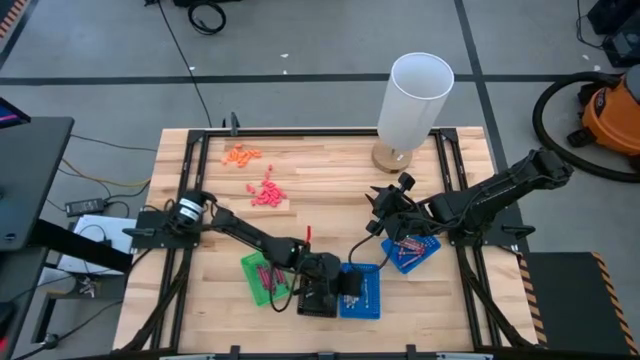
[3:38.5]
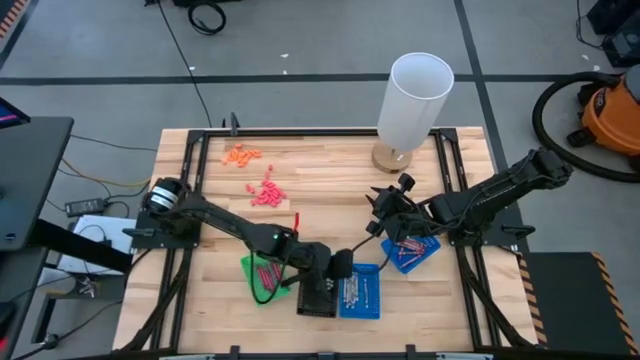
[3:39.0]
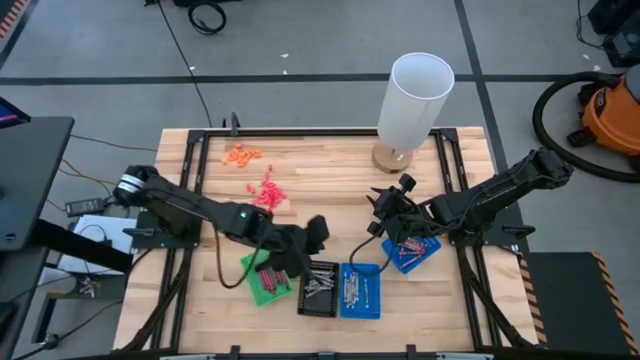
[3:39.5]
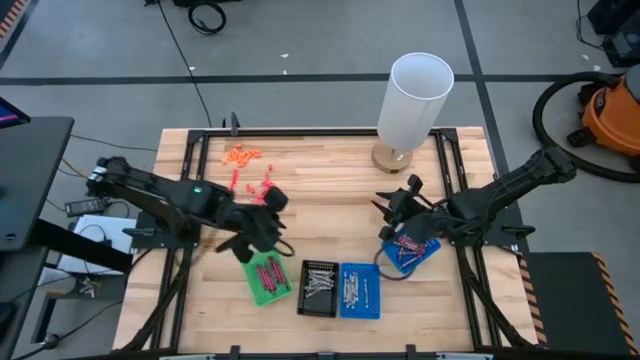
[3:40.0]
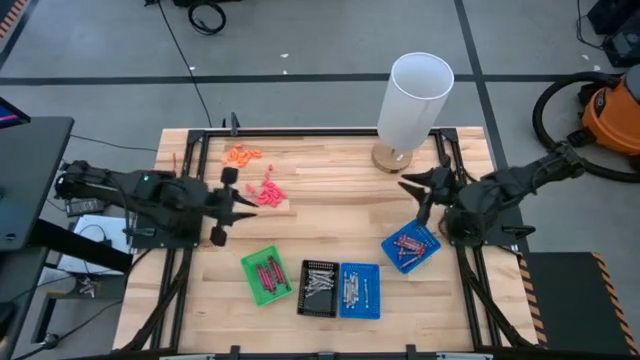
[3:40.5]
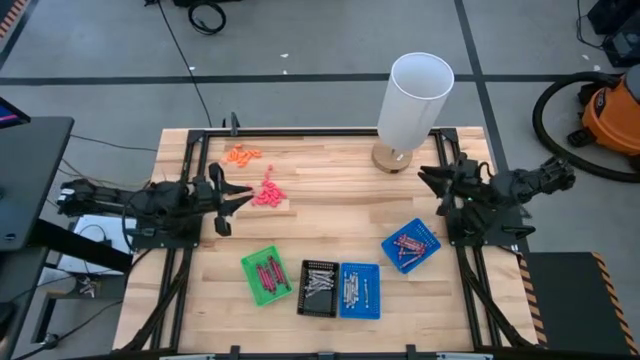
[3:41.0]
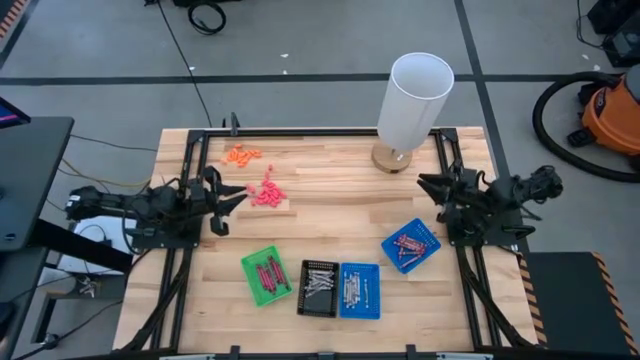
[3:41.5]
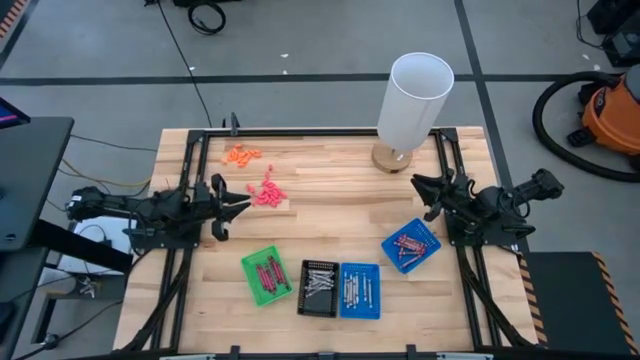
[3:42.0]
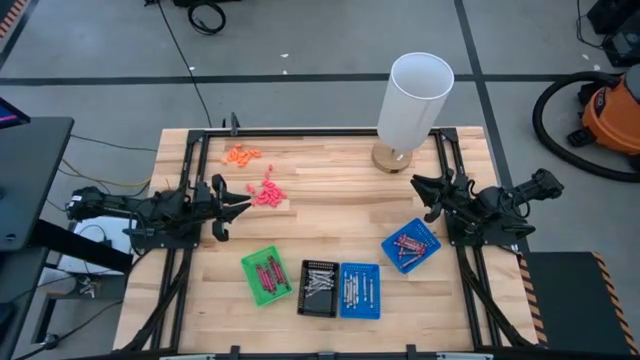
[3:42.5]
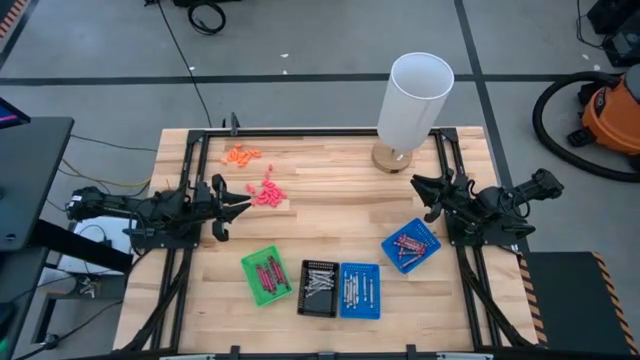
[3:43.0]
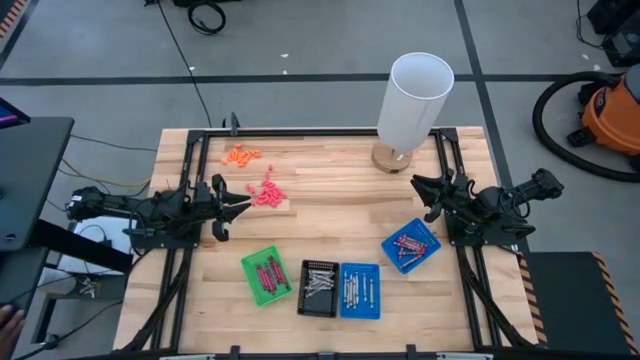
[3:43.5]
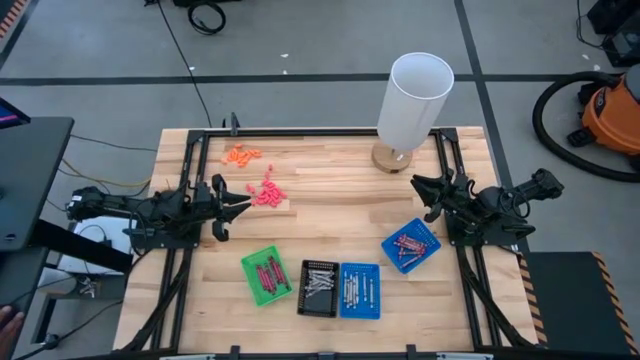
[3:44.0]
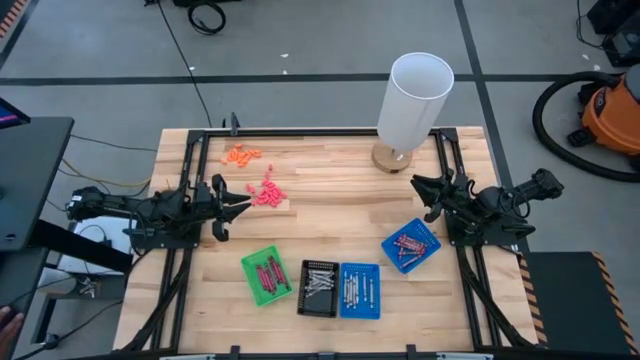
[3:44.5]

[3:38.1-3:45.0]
Task: Sort crayons
Return to Home Position

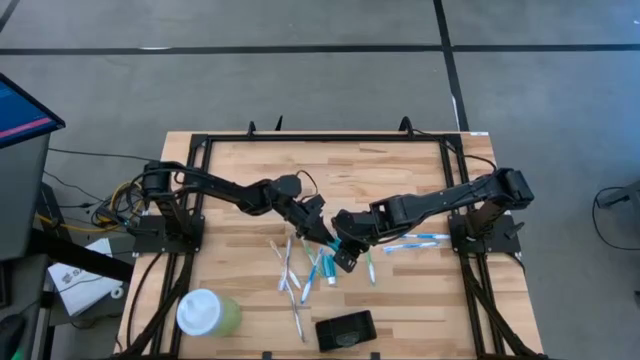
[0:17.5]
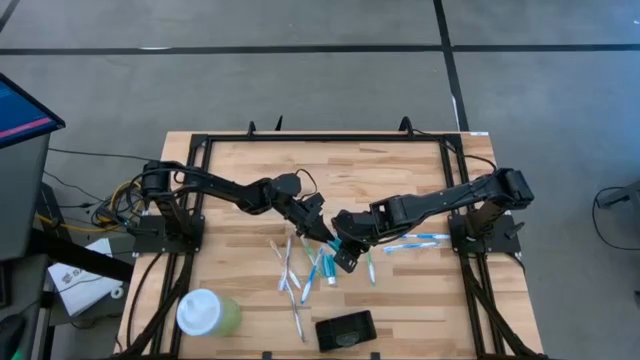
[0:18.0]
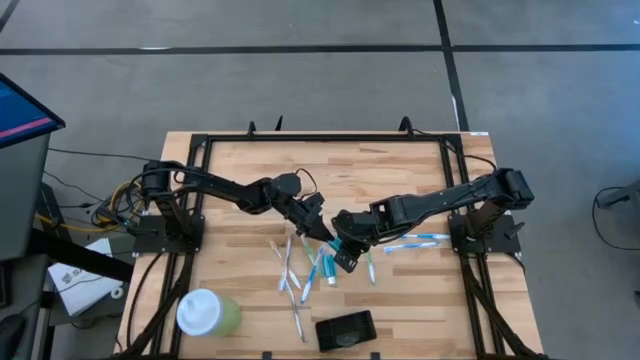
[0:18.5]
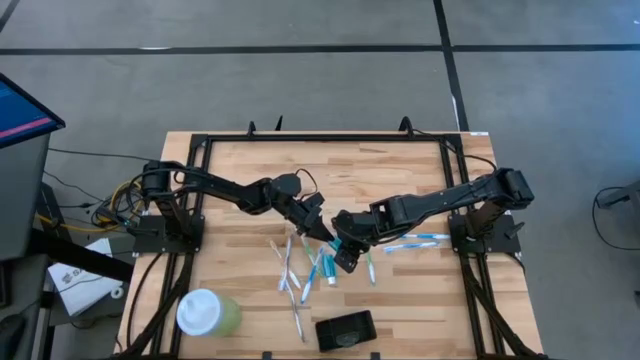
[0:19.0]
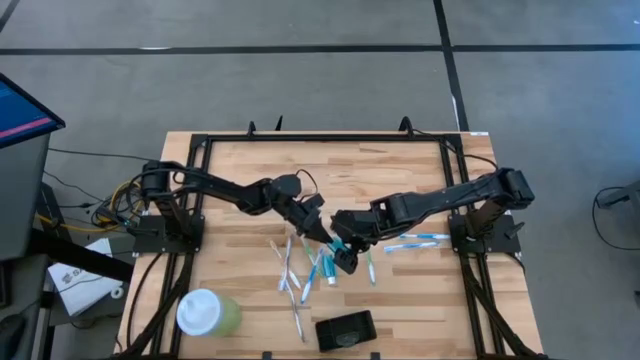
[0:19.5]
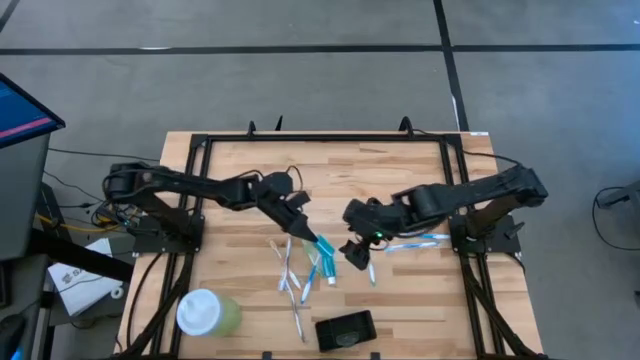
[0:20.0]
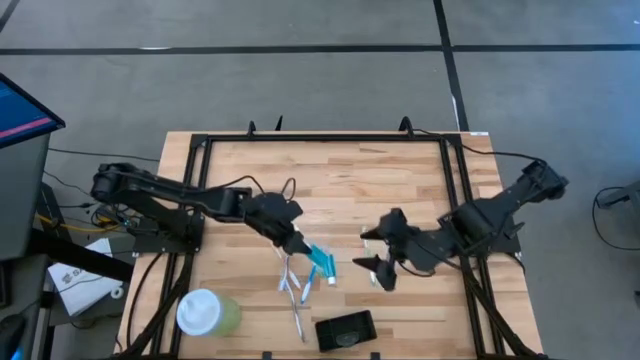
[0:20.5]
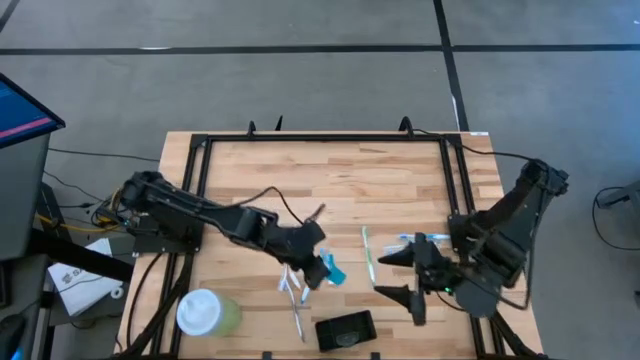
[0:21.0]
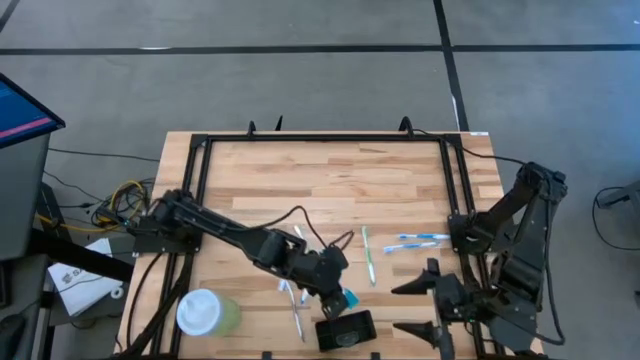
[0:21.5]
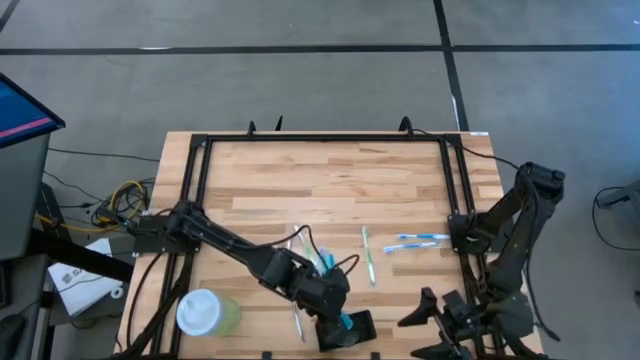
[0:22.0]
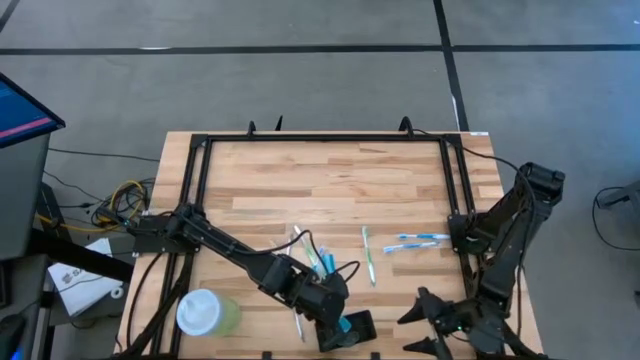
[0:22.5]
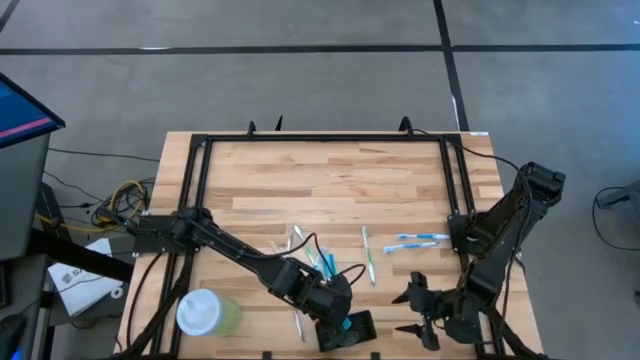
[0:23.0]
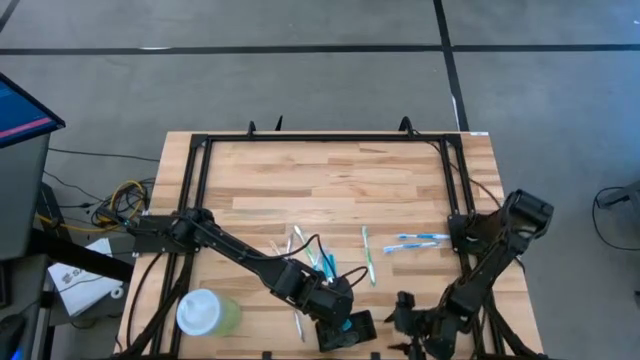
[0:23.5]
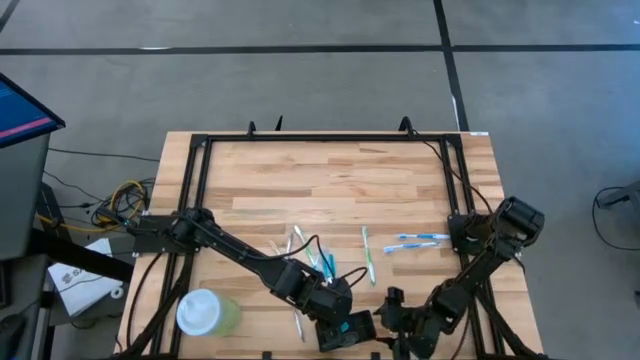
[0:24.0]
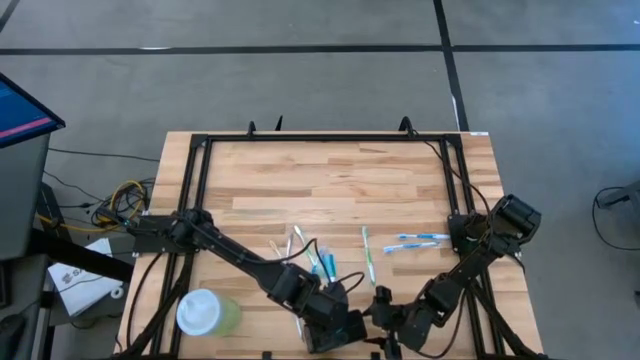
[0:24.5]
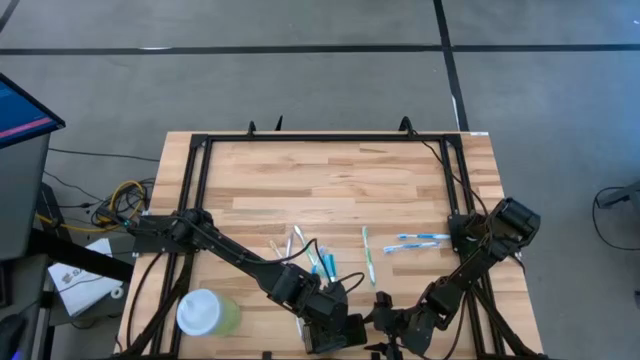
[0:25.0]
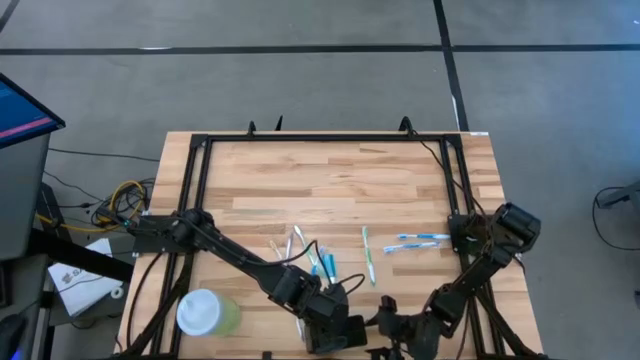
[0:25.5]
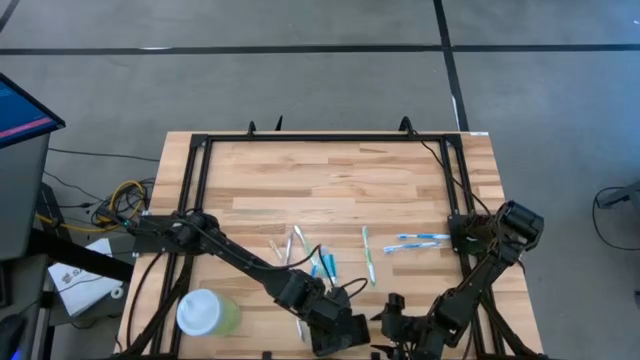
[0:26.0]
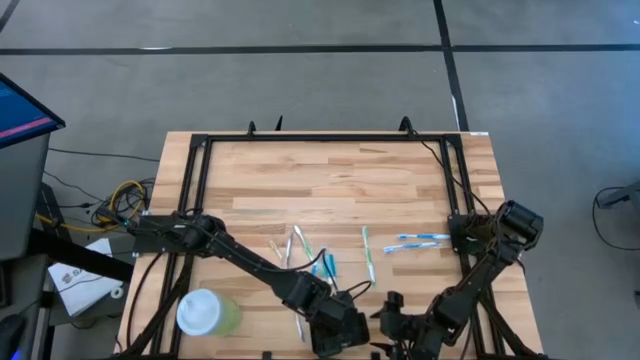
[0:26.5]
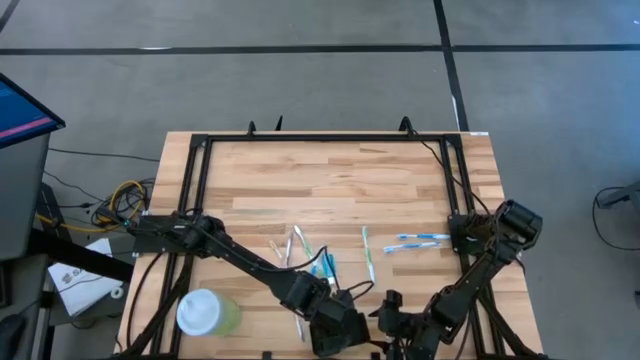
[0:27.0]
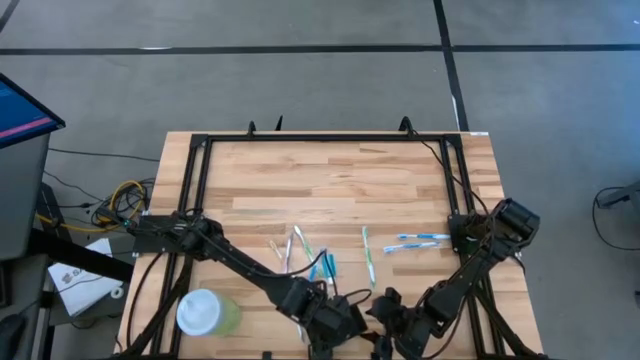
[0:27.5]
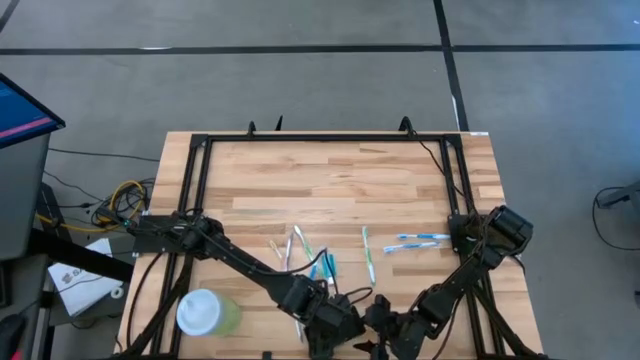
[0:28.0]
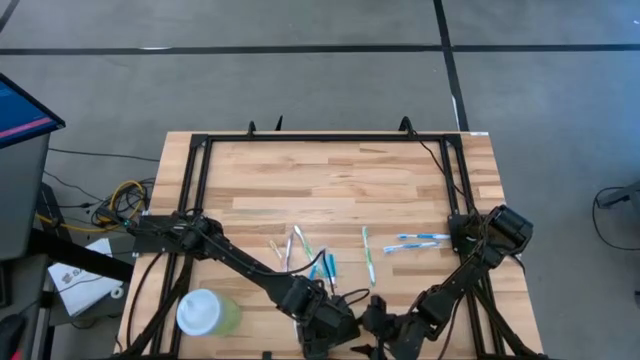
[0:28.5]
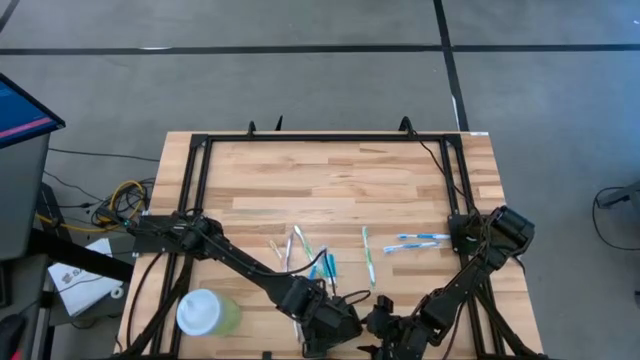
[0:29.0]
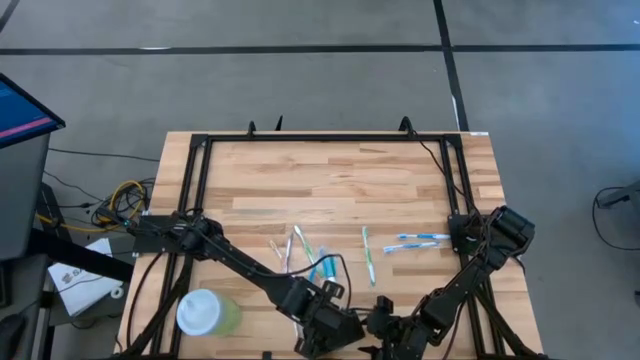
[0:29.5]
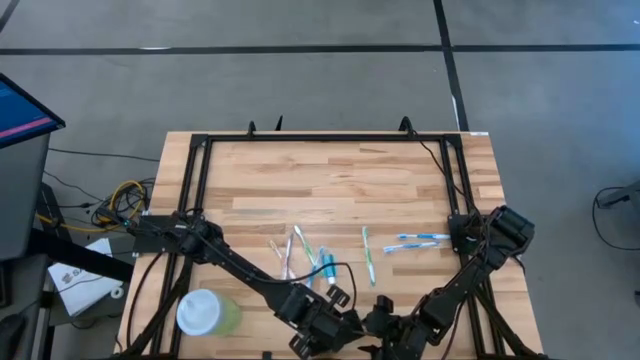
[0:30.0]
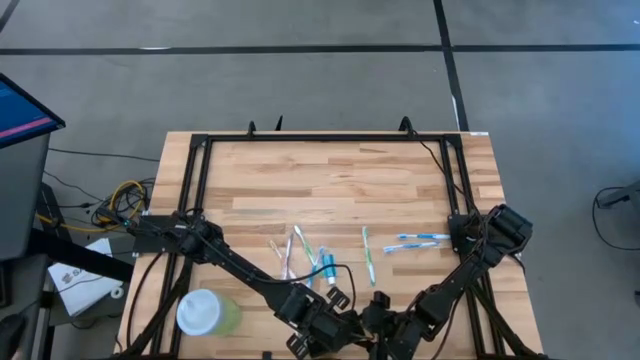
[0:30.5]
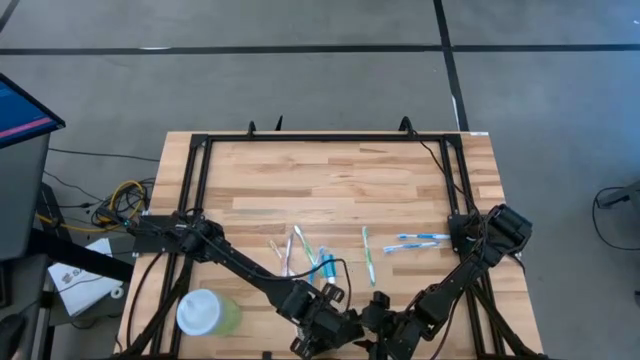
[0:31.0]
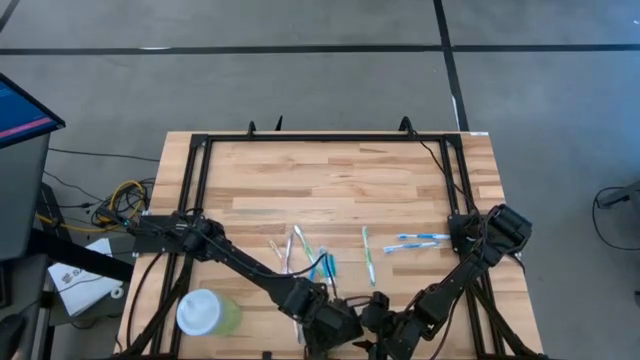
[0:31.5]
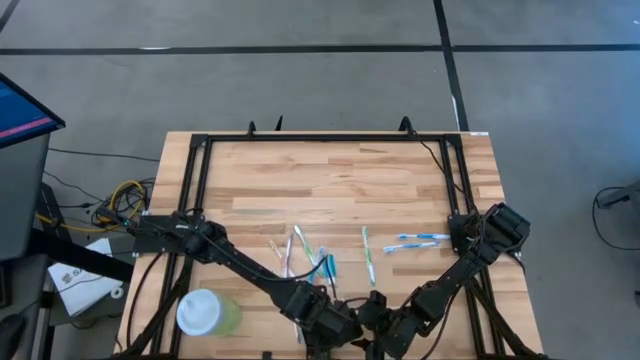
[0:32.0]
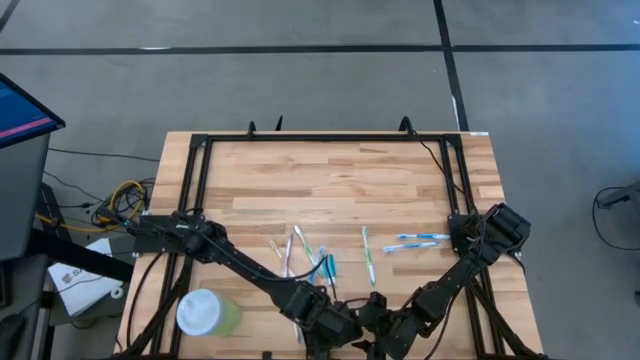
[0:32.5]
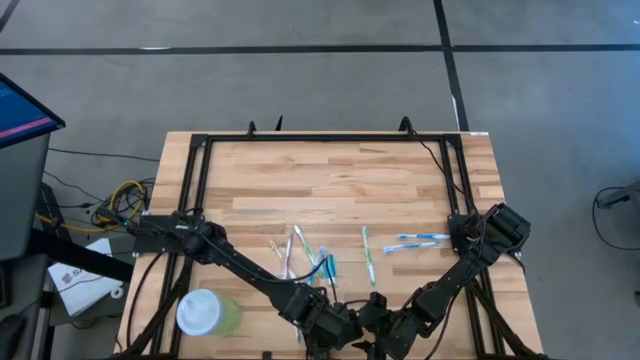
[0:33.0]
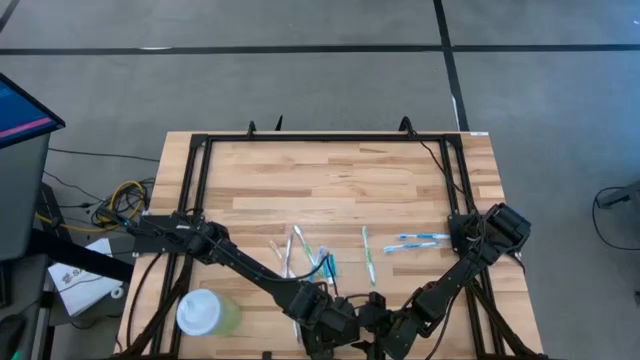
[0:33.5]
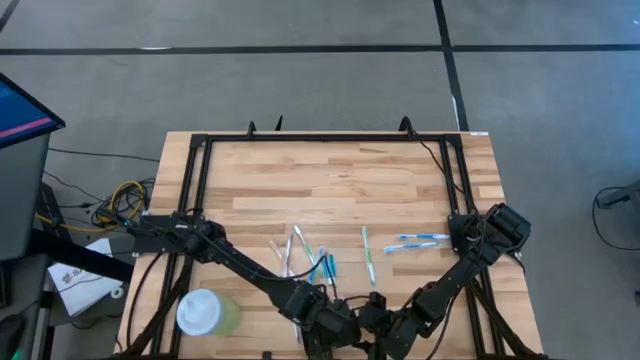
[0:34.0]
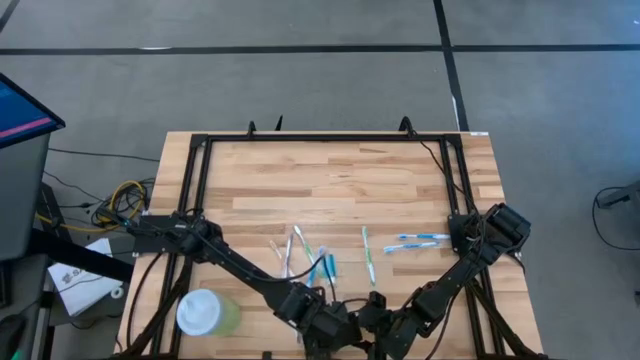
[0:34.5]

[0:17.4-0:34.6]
Task: Pick & Place toothbrushing station
Put the right blue mouthwash into the black wire organizer
